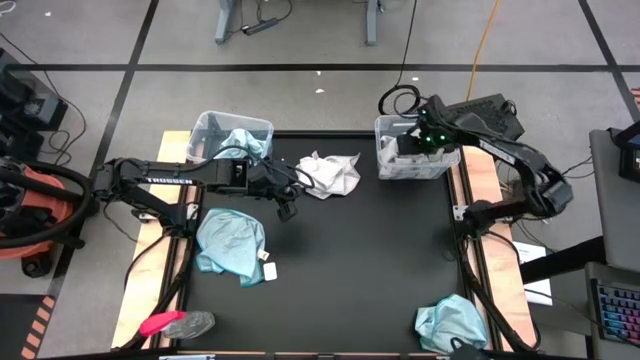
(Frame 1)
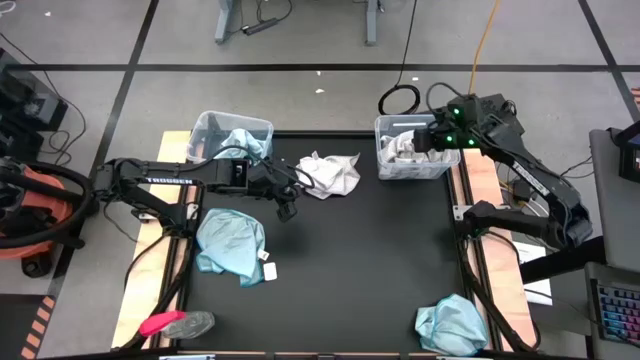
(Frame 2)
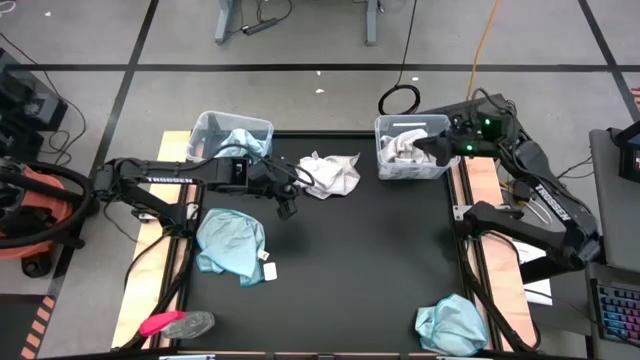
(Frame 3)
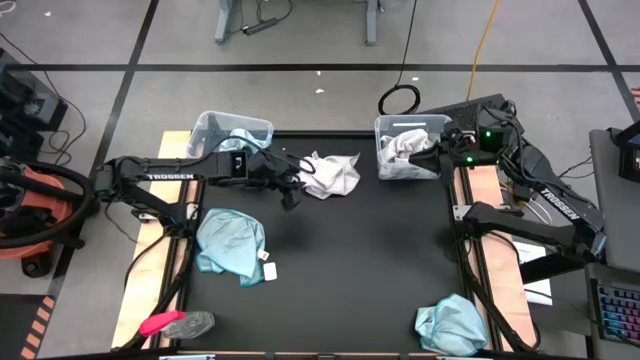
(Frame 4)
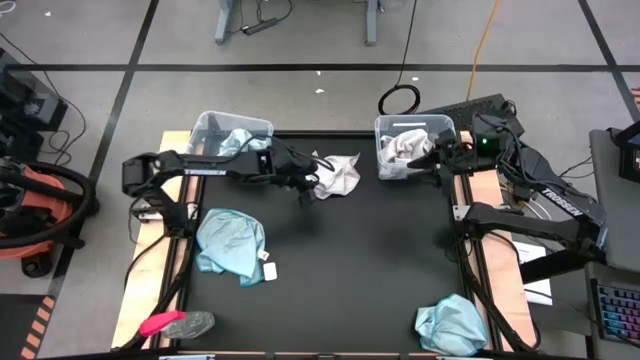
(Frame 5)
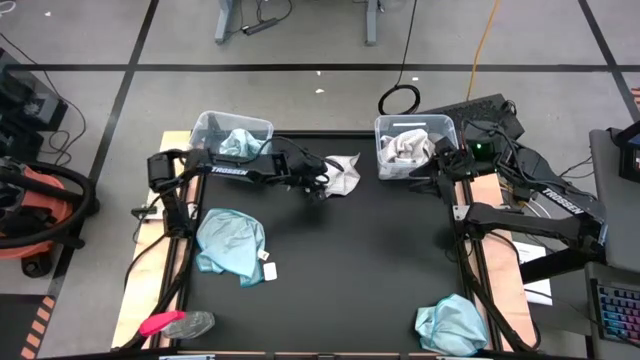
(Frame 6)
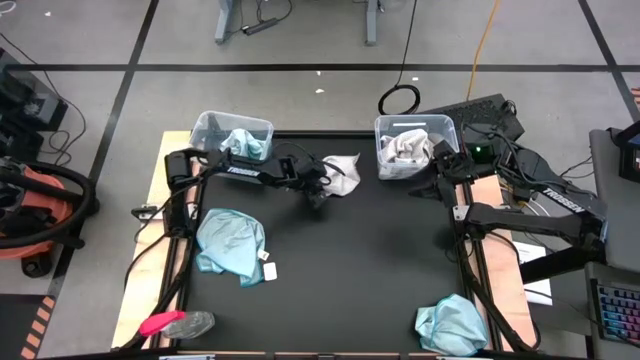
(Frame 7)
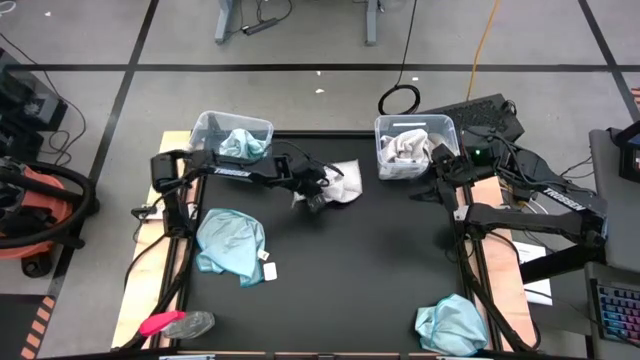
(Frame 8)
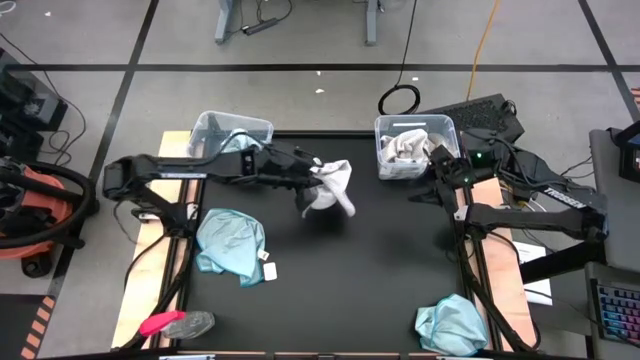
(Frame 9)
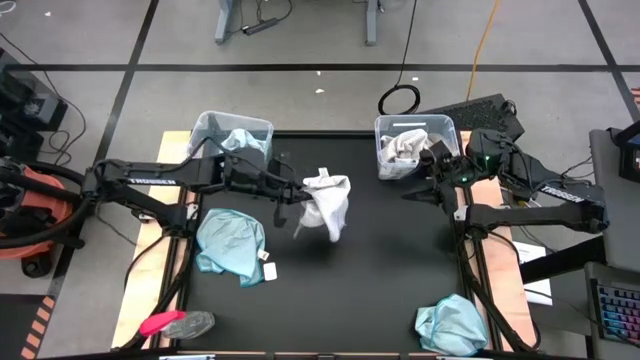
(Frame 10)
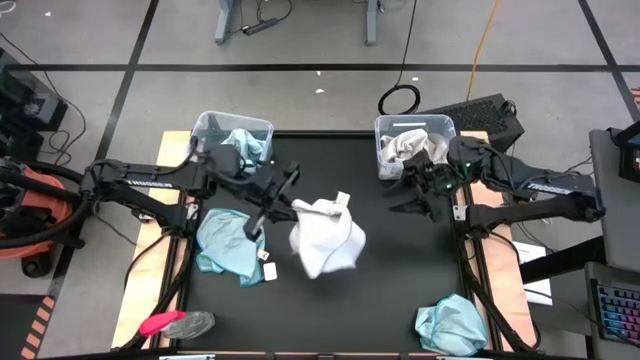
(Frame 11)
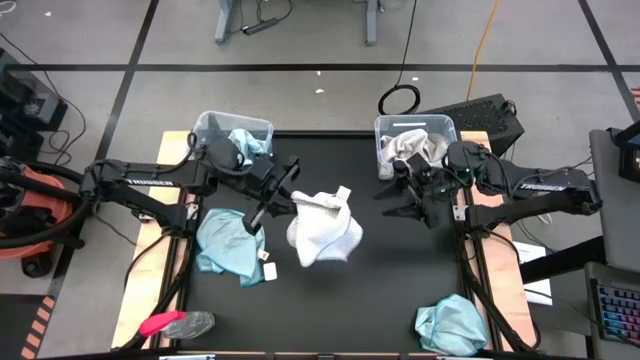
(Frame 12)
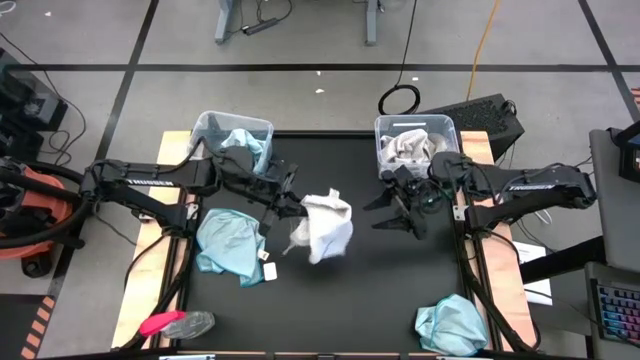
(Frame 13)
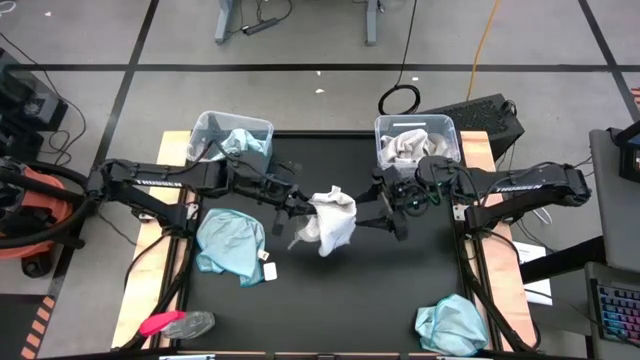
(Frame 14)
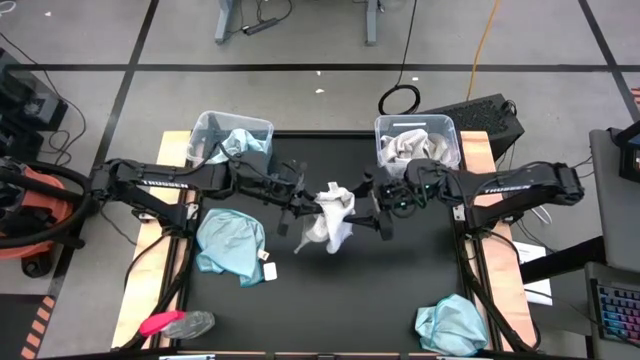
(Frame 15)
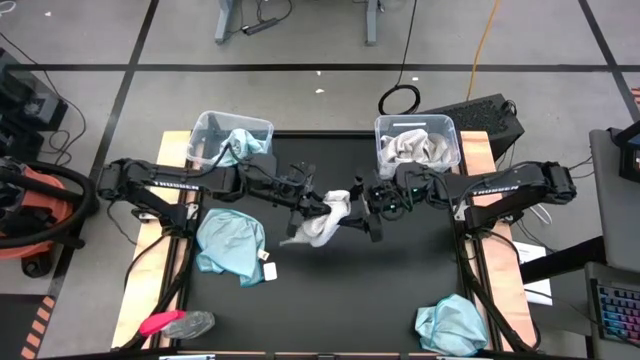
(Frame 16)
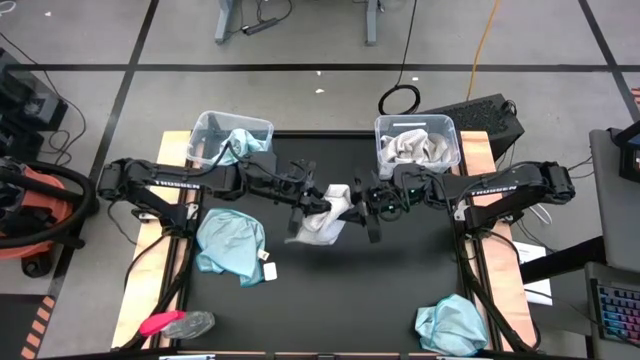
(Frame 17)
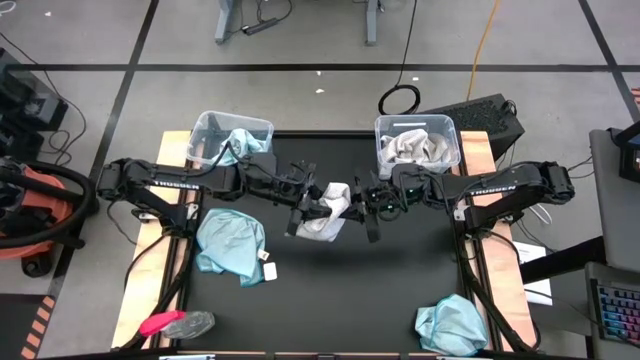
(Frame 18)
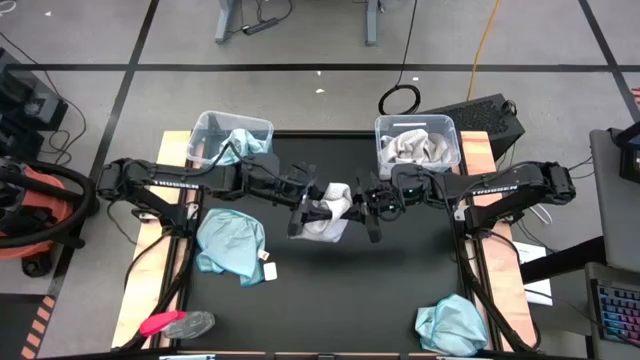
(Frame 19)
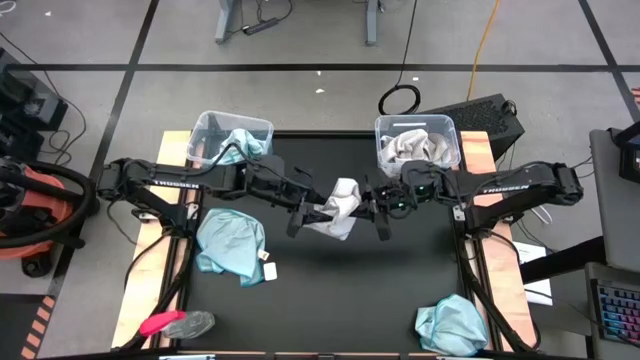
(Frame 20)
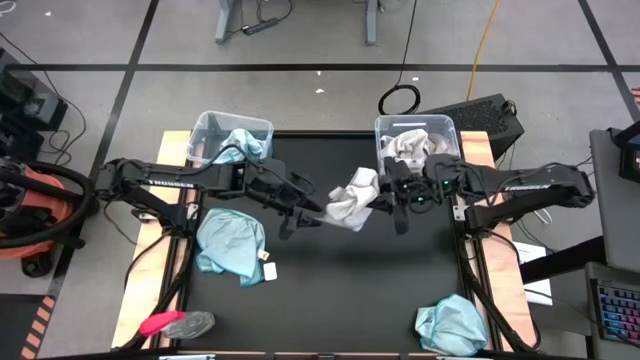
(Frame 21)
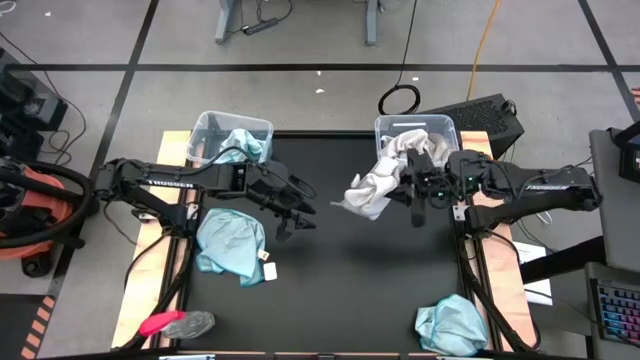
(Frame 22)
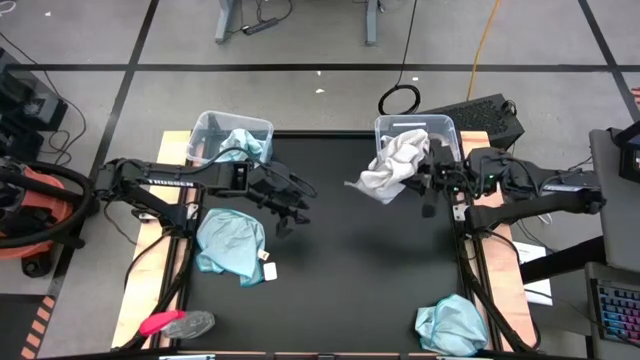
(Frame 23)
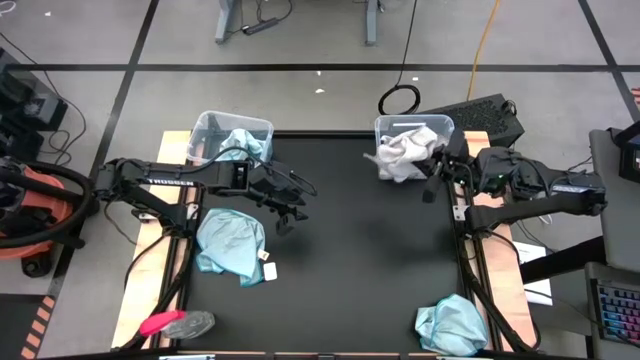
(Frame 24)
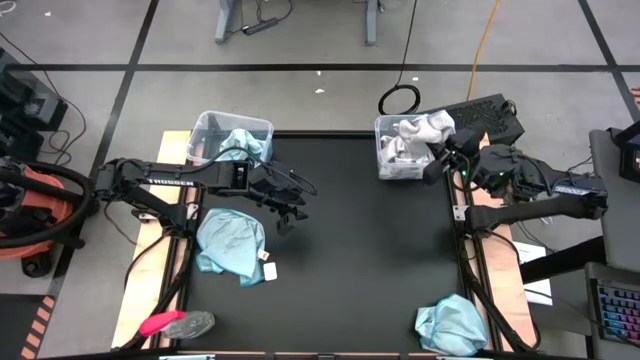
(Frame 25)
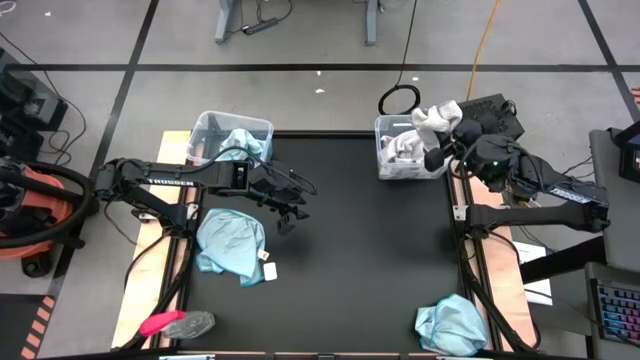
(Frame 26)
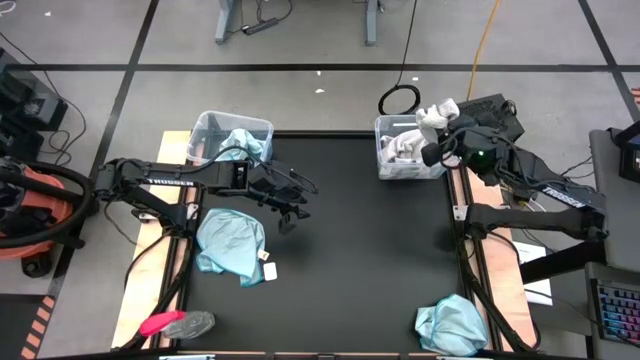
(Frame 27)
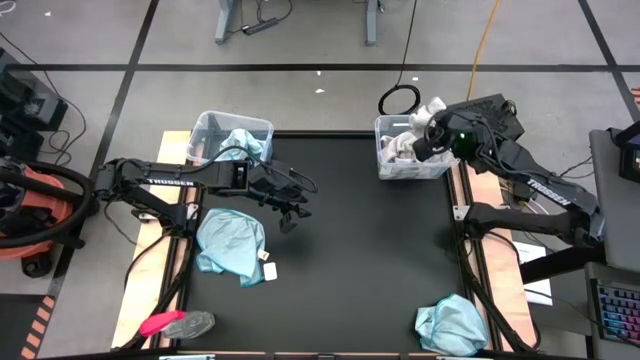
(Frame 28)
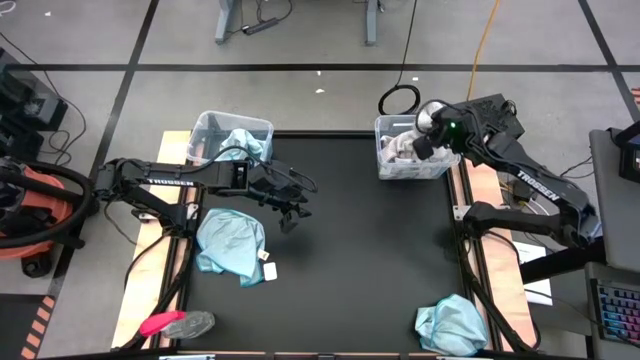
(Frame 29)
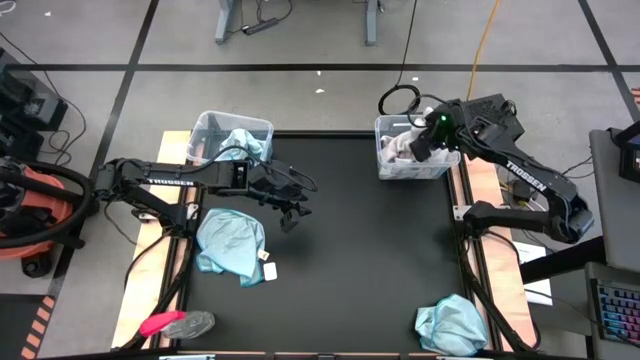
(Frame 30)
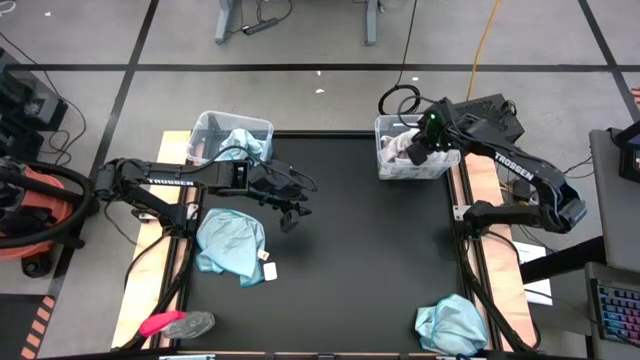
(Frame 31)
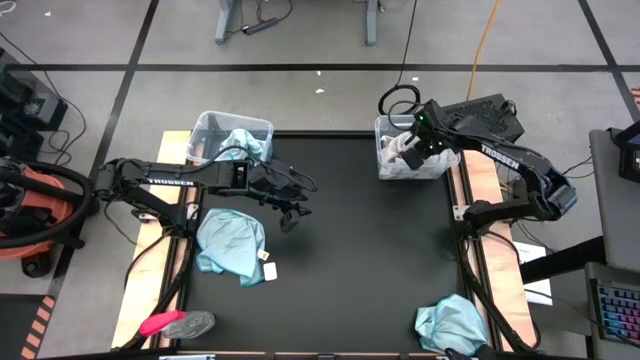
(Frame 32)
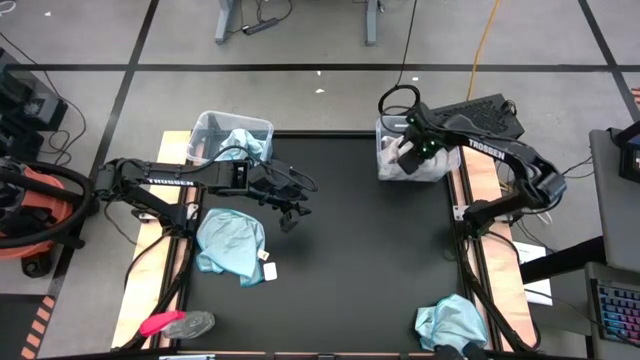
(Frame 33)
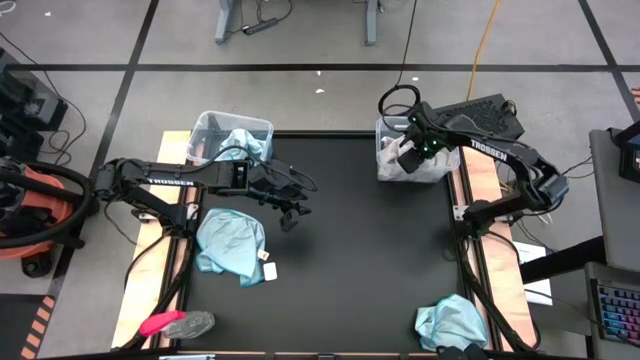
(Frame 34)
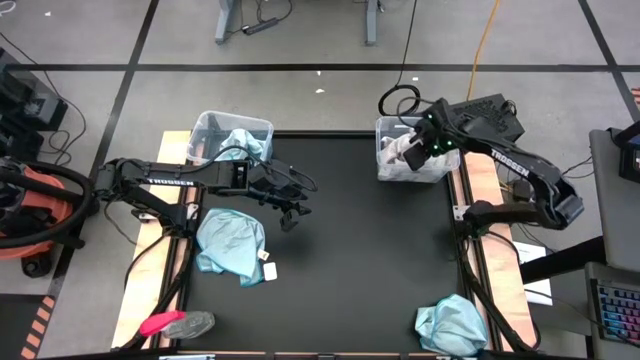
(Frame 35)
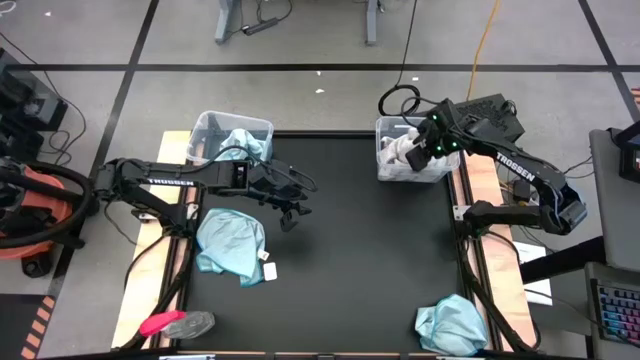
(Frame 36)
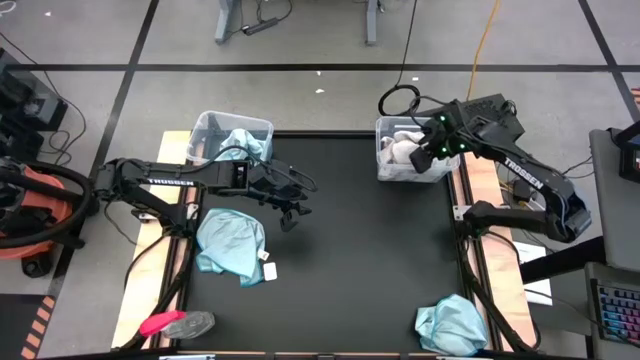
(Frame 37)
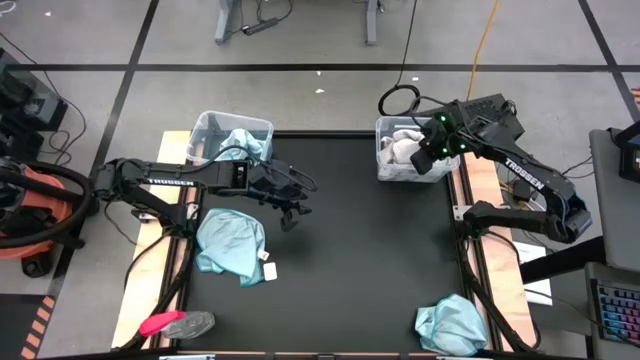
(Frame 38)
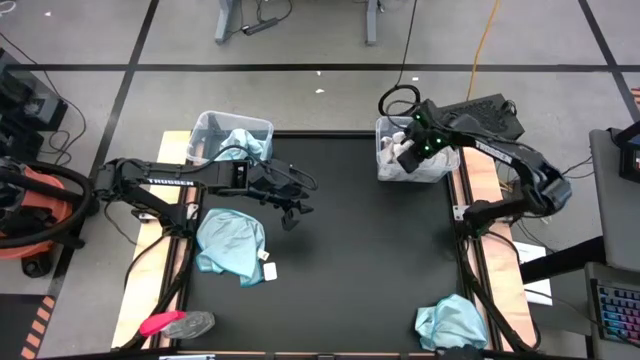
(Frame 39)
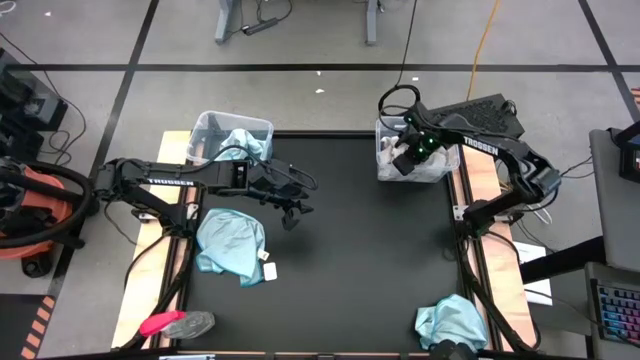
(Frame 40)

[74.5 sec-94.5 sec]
Task: Sort microfiber towel by color & place in baskets
Put the gray microfiber towel into the right transparent bin

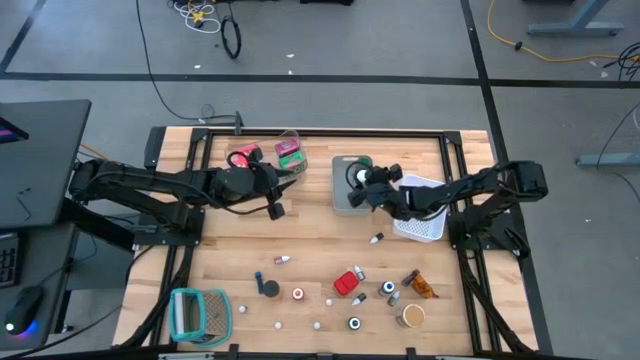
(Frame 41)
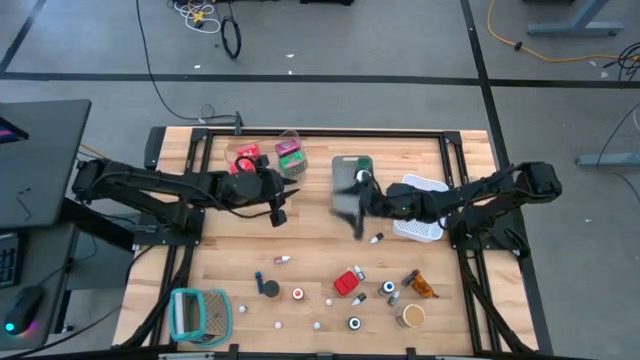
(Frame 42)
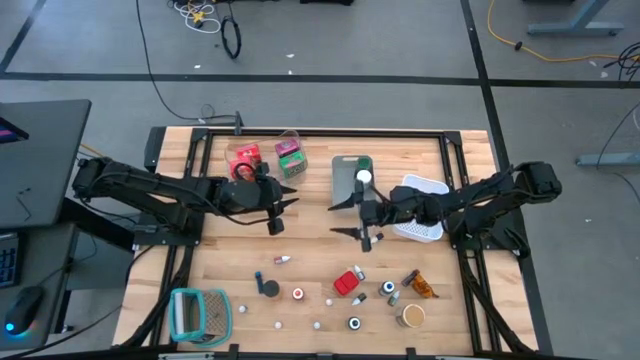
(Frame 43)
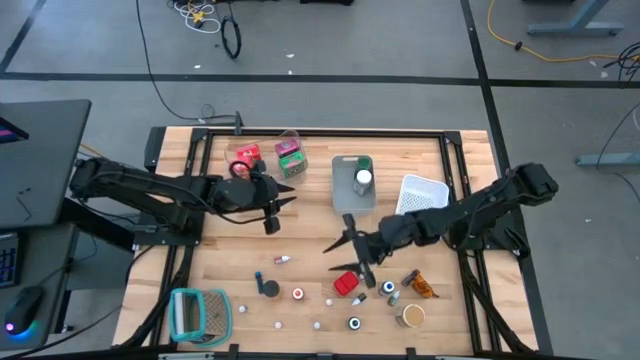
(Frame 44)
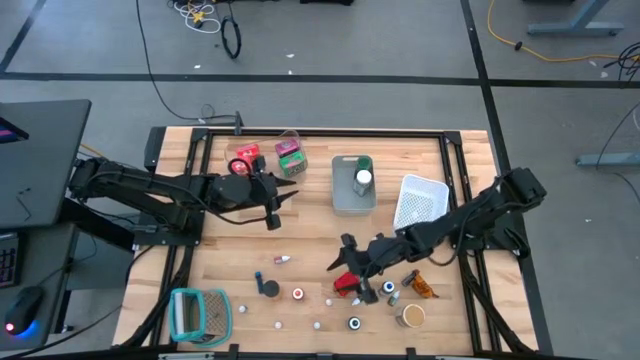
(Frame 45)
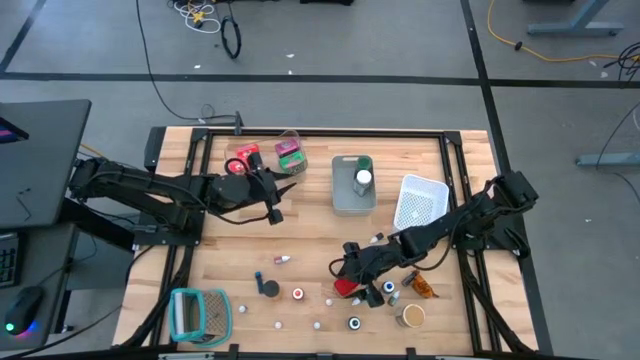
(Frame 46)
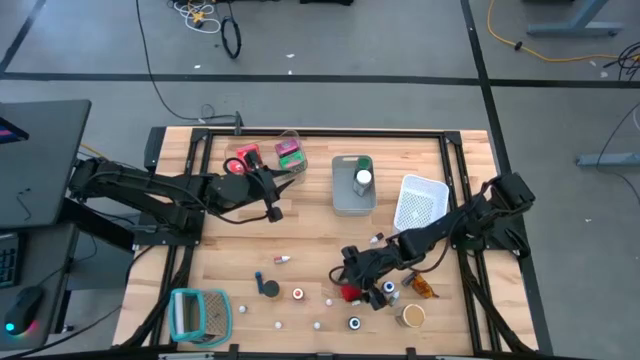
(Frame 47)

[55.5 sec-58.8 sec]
Task: Pick & Place Kitchen Items
Put the red spice can into the gray bin
